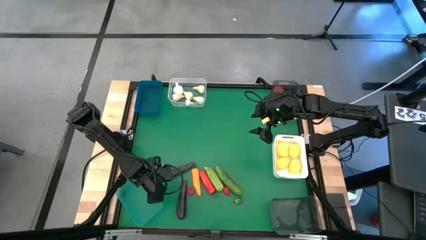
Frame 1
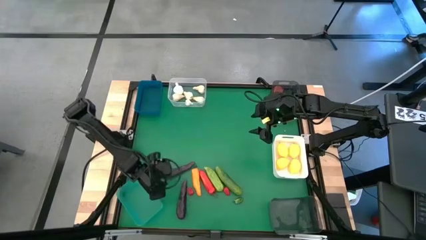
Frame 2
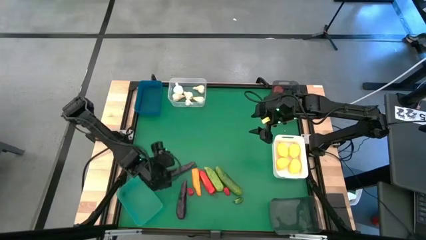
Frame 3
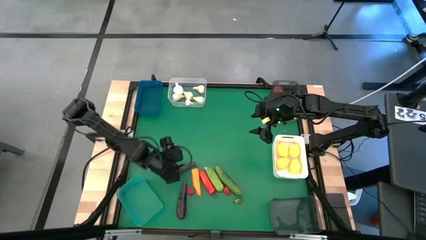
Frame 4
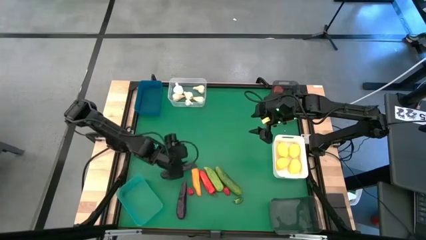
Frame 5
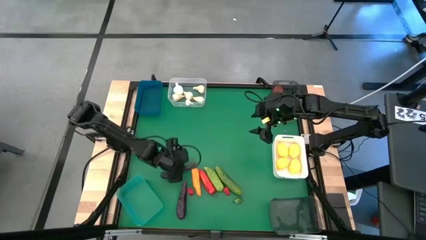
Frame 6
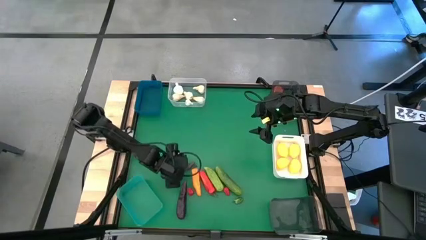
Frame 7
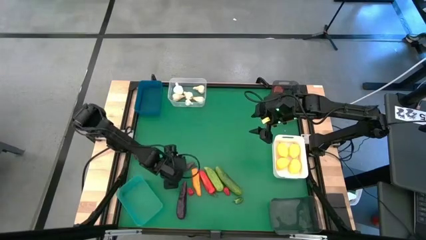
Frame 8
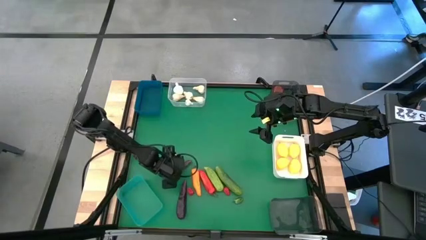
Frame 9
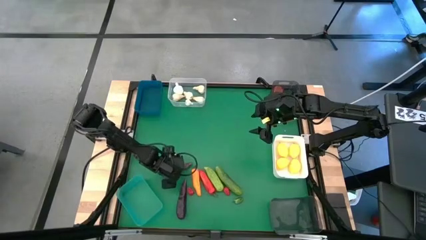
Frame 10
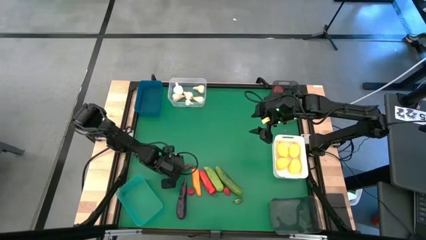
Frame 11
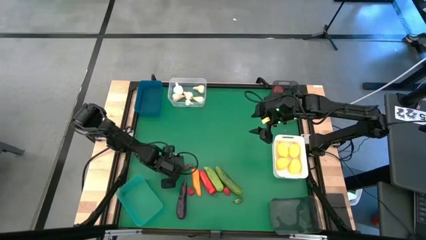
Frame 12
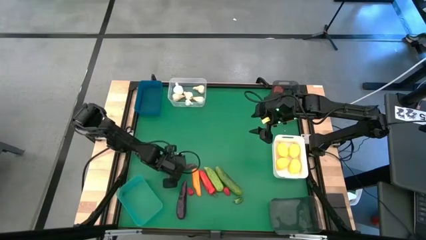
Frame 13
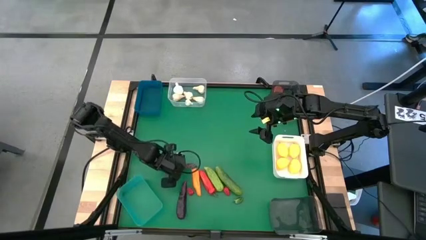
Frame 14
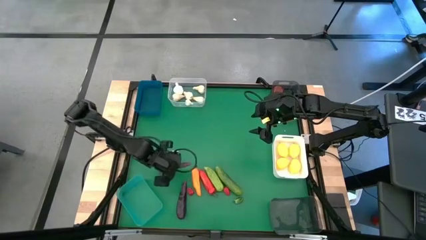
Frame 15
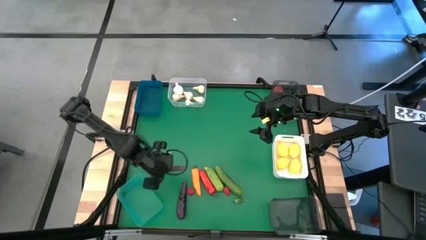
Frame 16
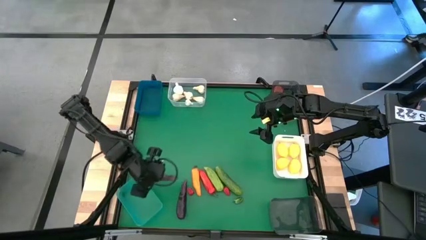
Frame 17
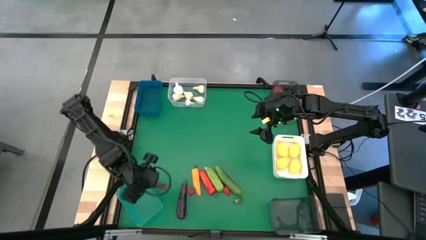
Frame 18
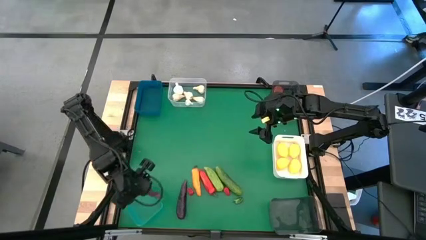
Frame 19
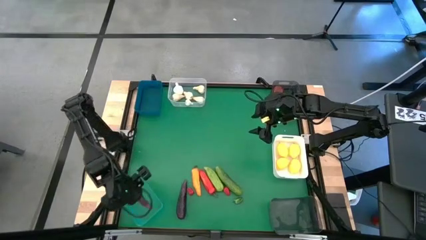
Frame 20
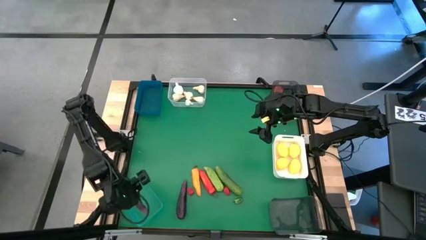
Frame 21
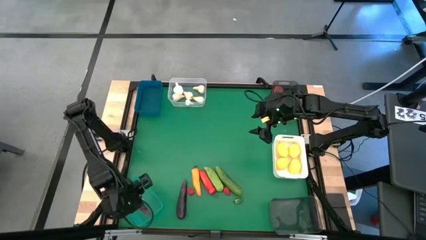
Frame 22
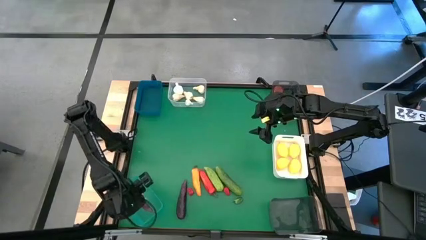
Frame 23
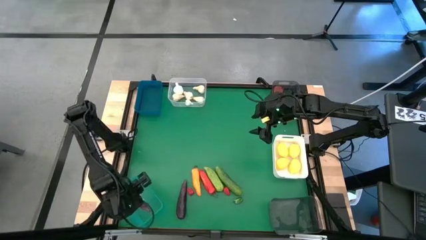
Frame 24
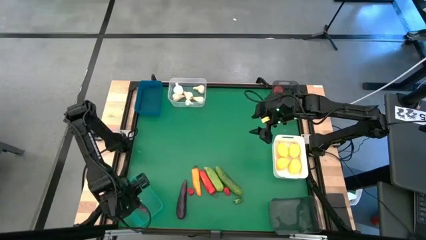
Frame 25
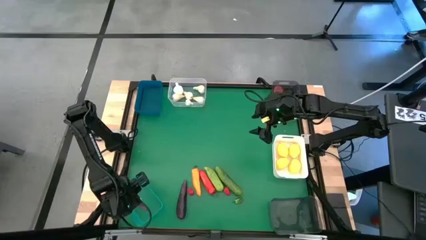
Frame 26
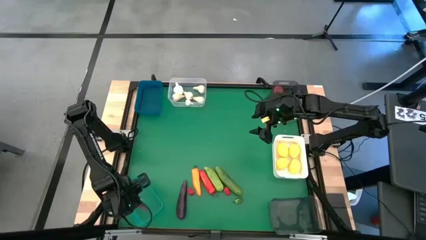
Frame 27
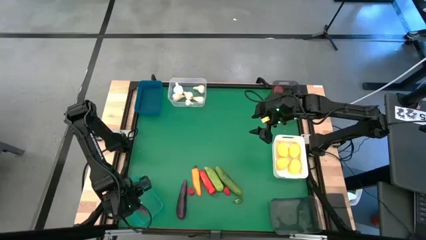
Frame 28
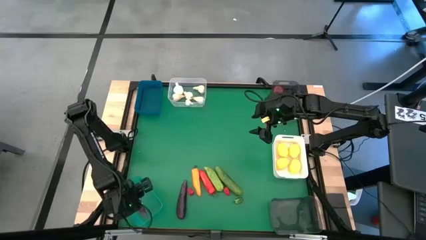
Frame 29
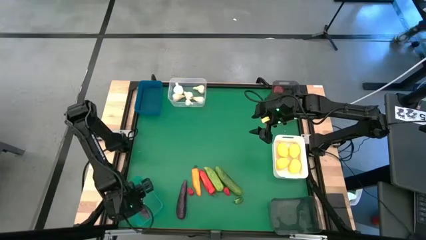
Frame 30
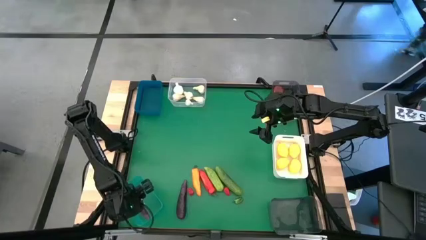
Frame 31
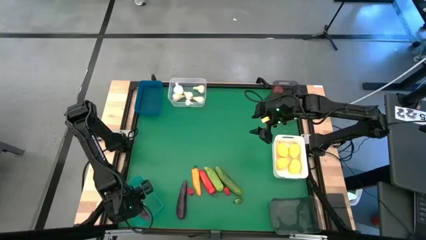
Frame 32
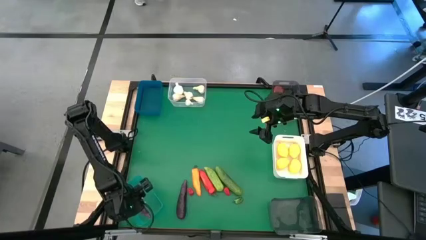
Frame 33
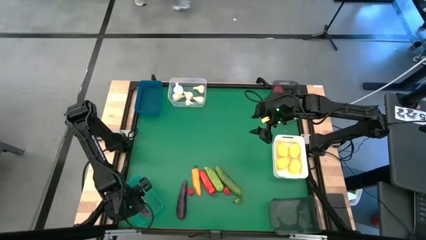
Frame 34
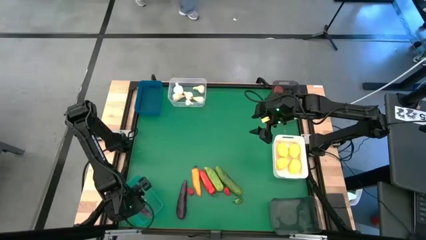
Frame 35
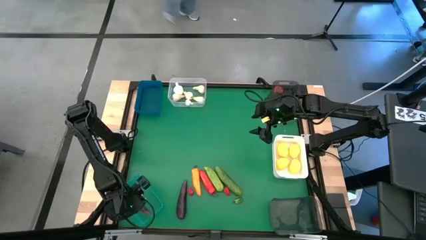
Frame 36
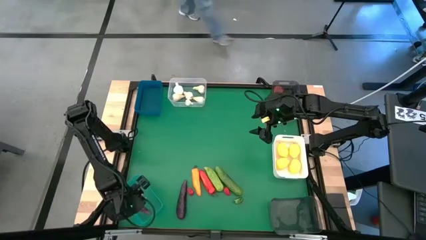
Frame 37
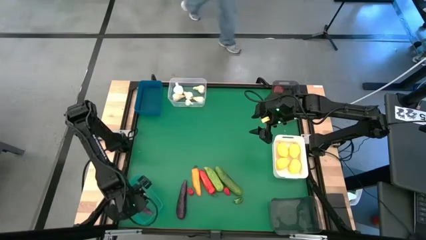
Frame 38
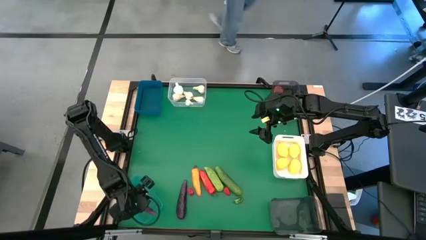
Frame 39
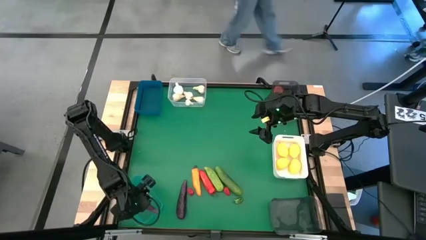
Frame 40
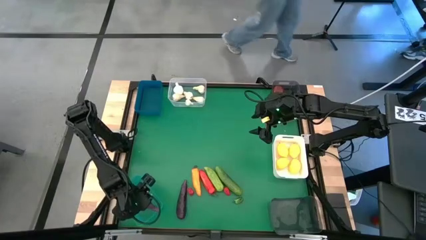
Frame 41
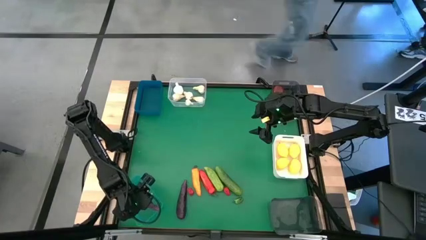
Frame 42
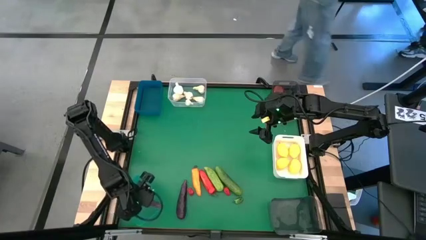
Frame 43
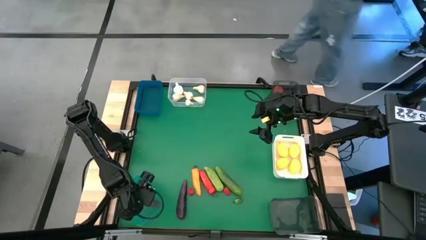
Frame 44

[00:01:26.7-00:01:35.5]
Task: Sort produce into baskets
Put the purple eggplant into the light green bin

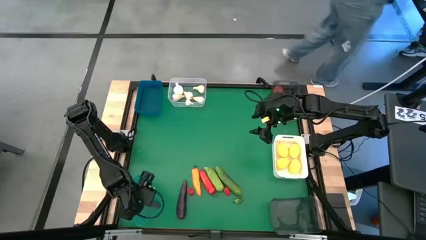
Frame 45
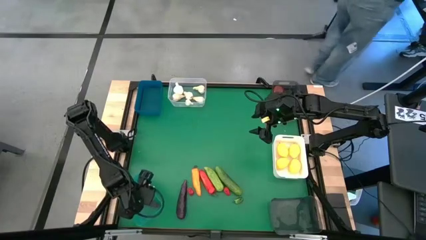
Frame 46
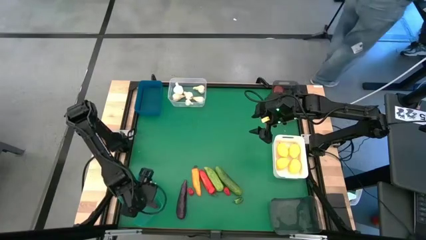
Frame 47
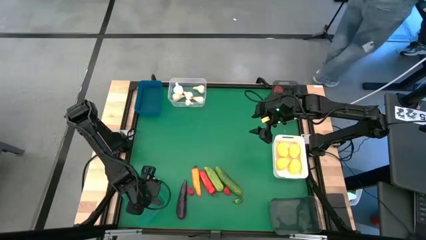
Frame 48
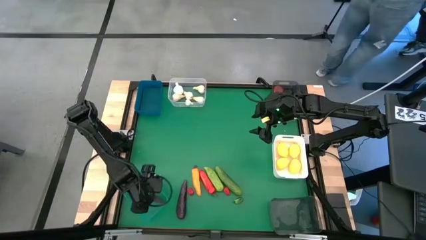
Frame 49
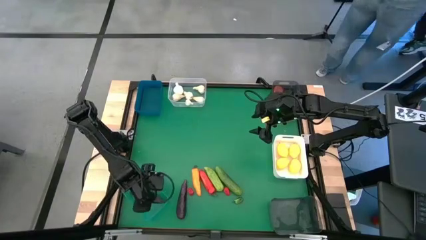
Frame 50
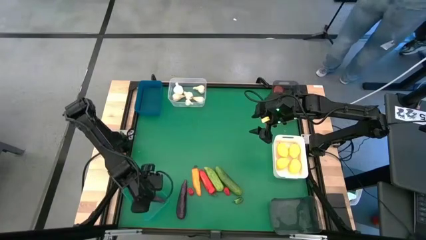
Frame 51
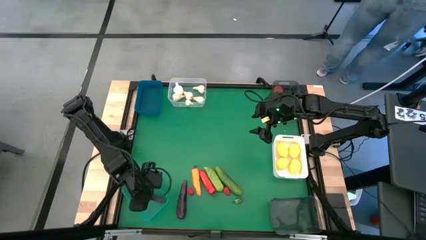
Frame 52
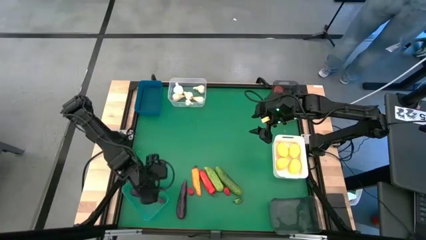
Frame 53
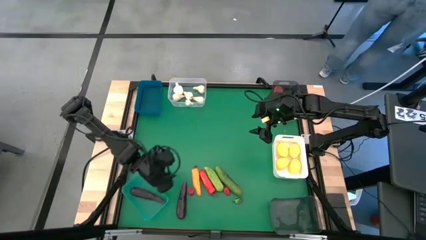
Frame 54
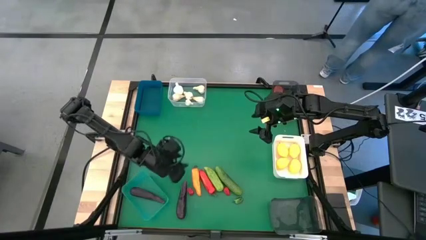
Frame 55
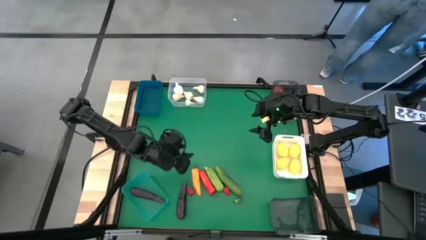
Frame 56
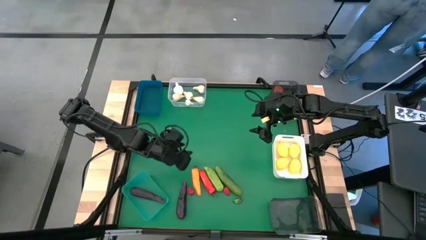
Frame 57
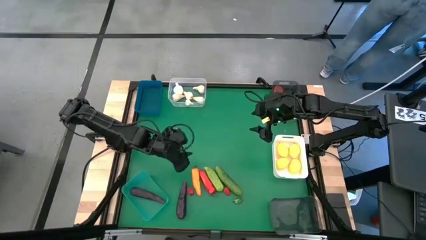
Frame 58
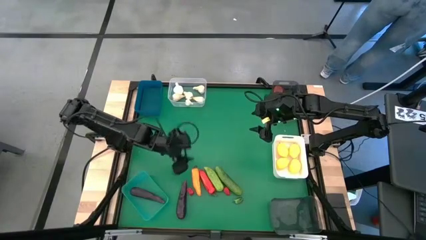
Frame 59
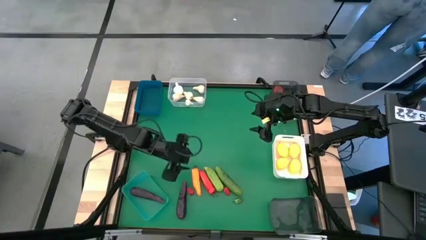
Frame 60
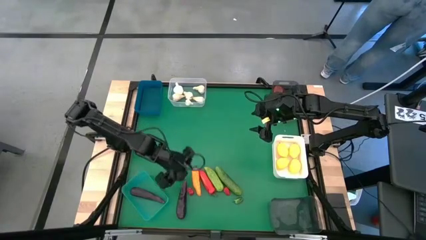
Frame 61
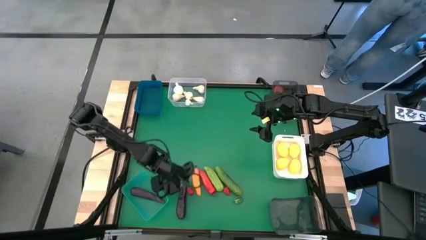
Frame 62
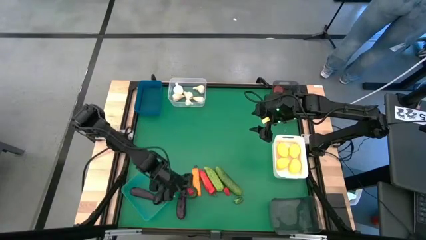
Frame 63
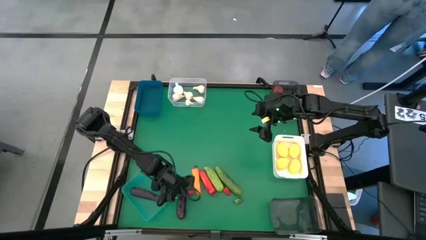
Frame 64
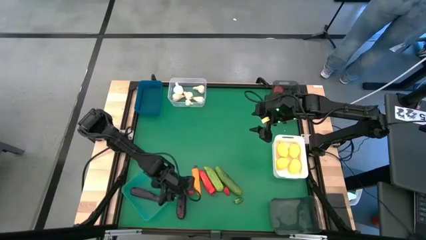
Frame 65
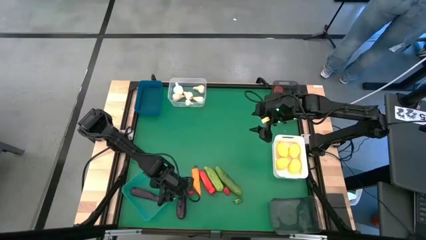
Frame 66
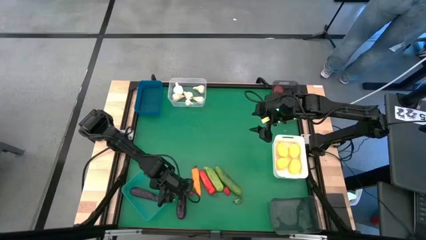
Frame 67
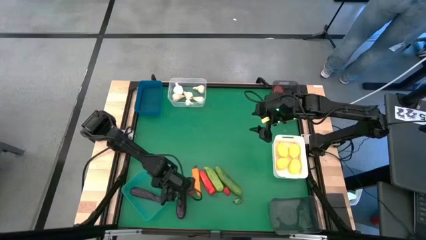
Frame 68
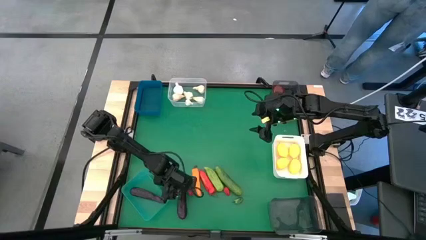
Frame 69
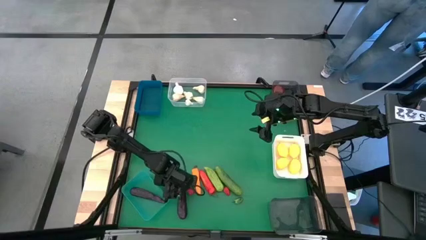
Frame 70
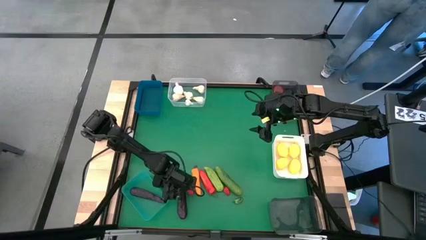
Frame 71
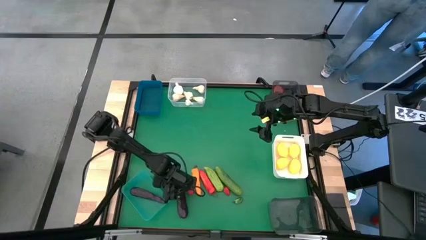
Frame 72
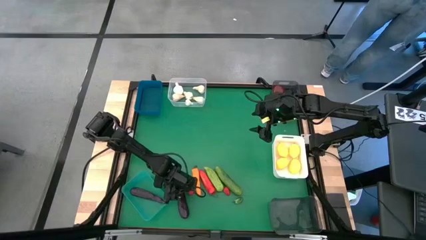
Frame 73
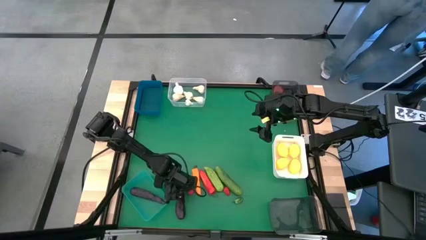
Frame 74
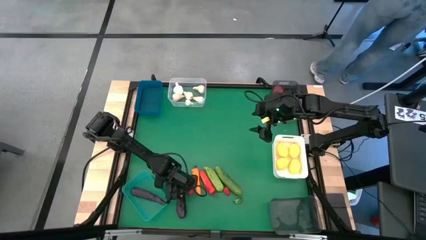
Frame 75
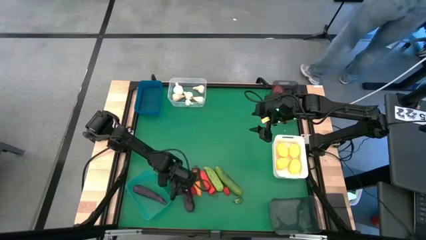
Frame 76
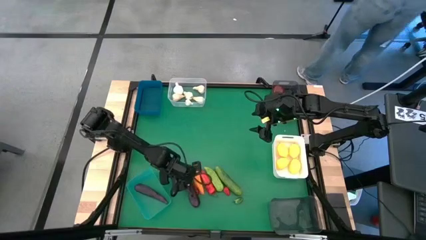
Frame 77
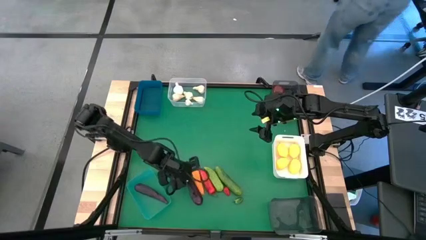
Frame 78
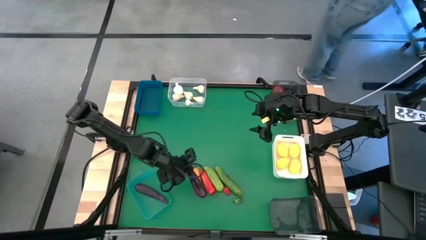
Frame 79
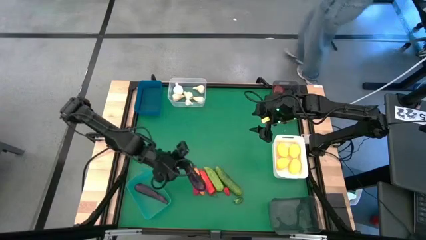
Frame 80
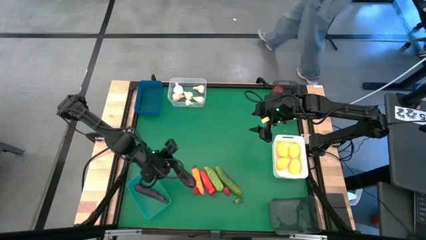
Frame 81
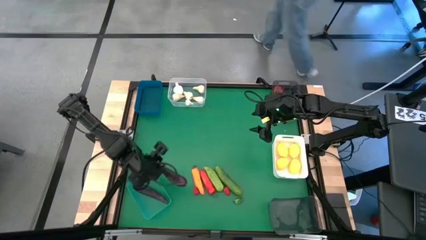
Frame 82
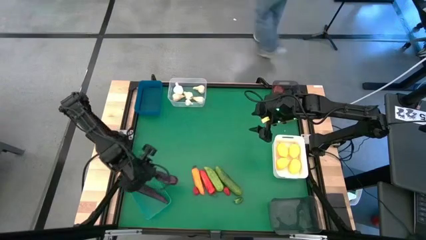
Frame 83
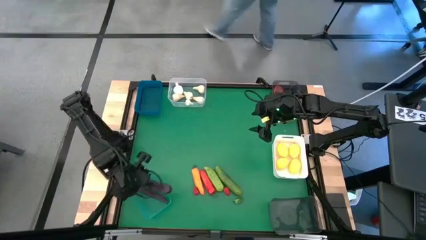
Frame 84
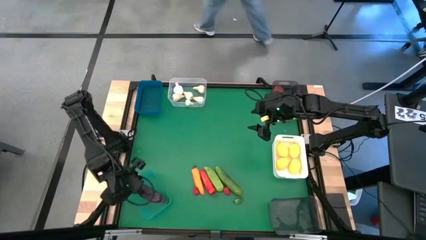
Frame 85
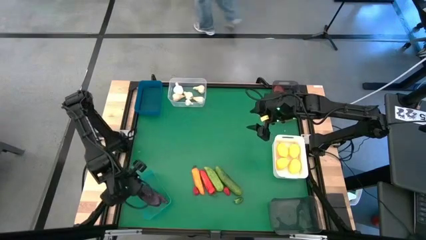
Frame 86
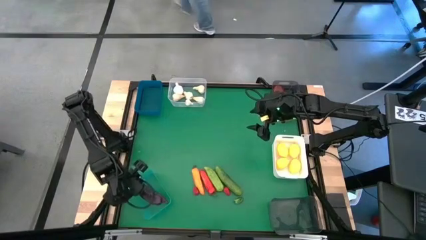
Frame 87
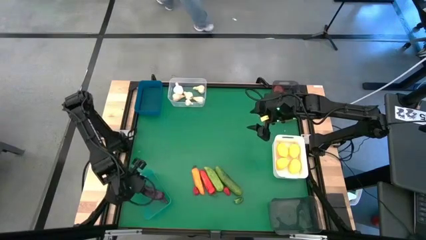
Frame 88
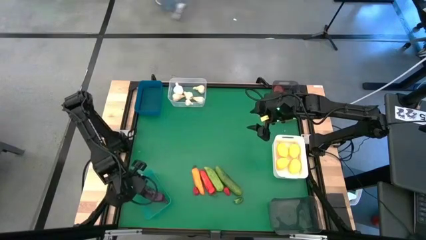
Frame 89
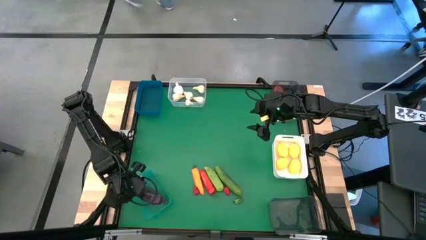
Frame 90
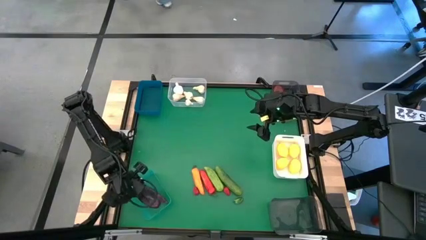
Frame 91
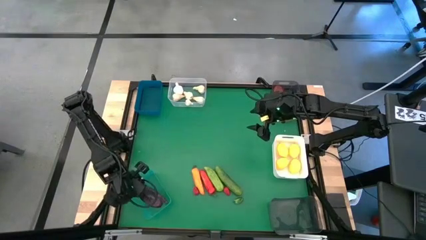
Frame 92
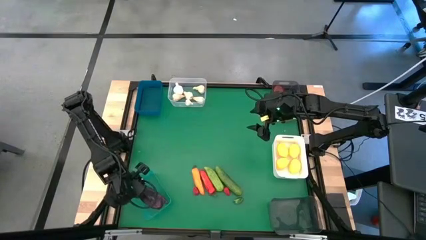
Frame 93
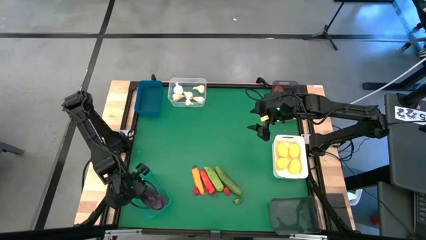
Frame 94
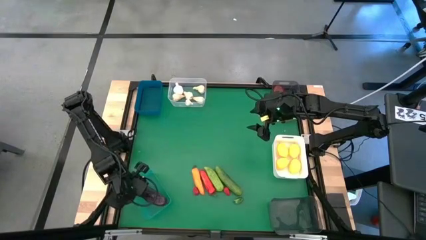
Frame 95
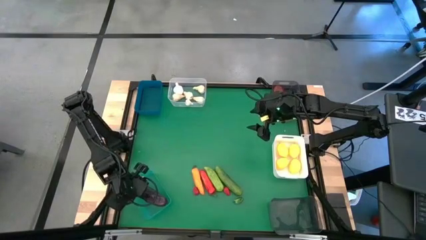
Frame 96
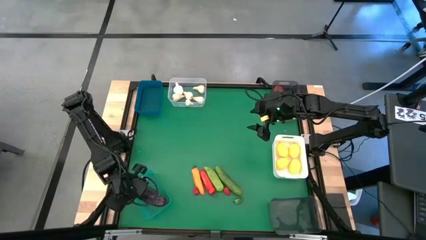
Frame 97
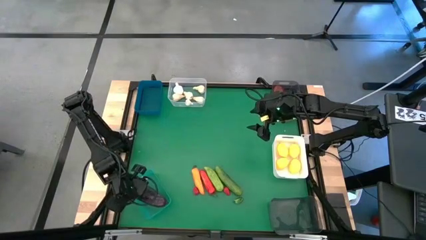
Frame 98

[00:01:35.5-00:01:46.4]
Put the purple eggplant into the light green bin
